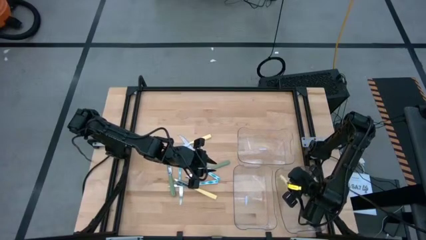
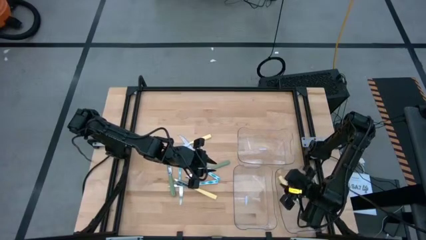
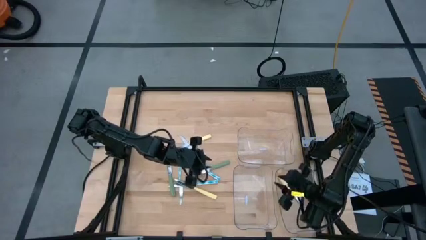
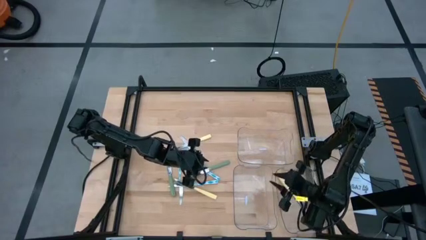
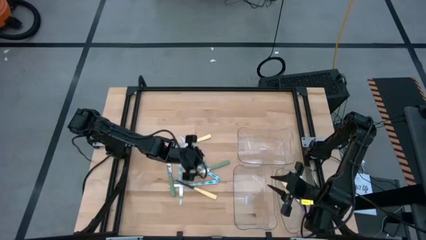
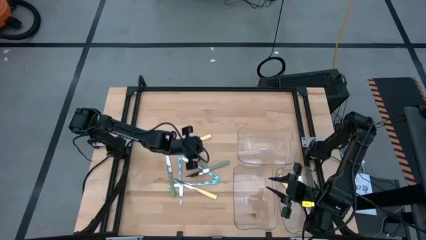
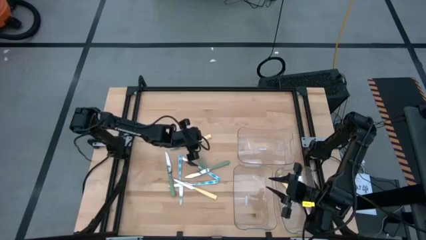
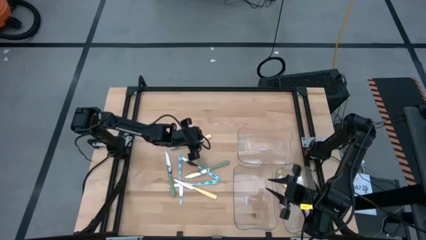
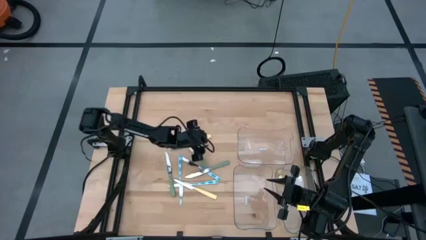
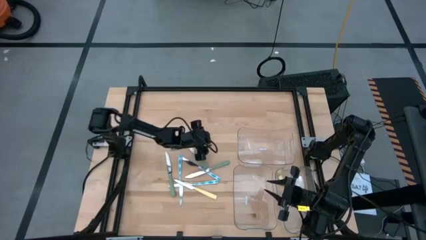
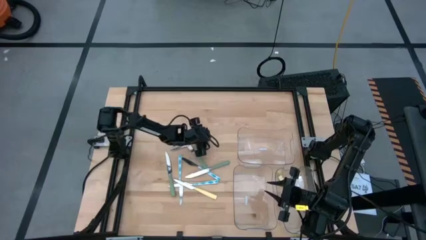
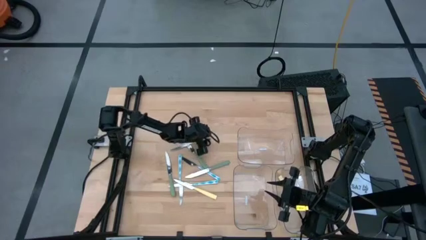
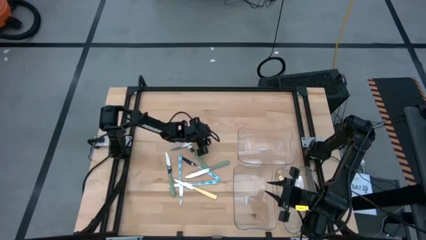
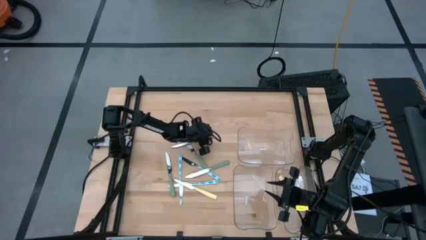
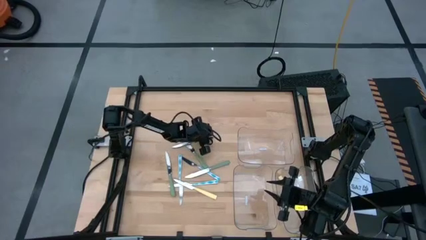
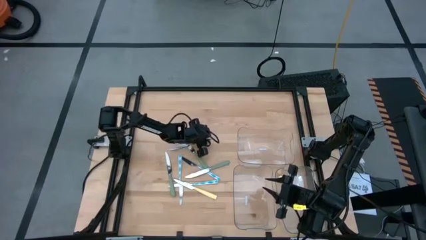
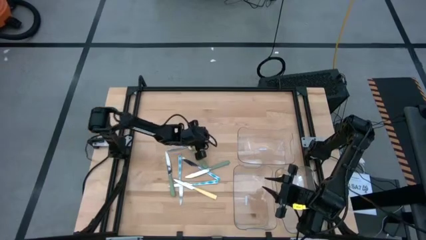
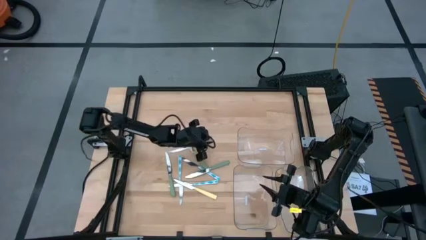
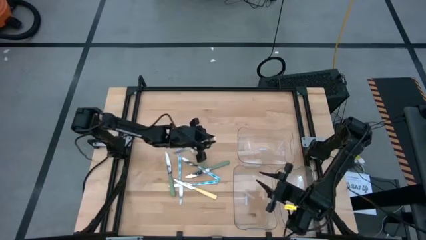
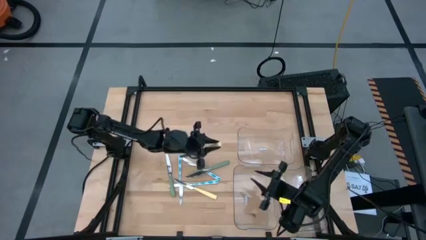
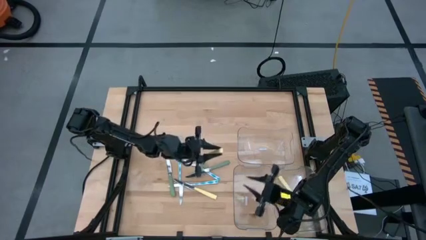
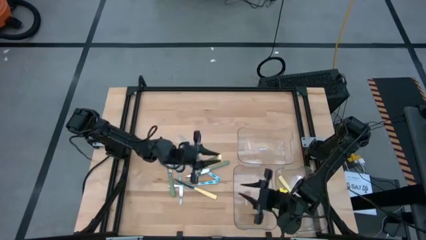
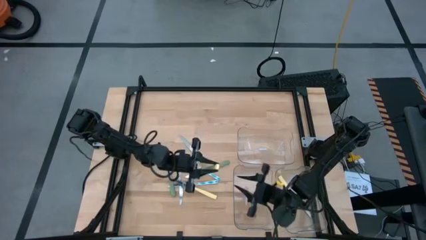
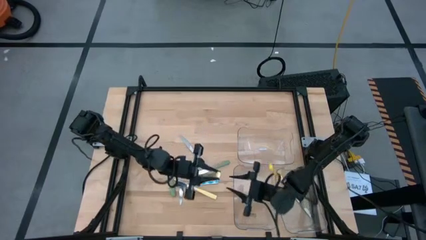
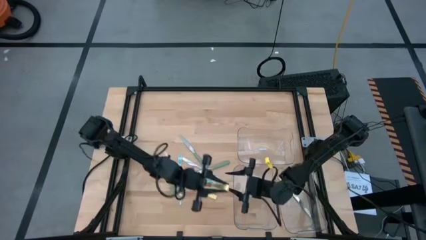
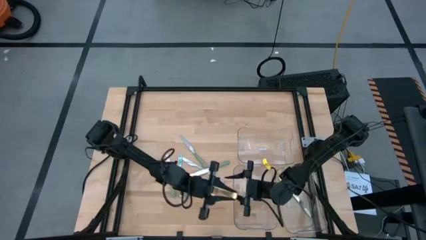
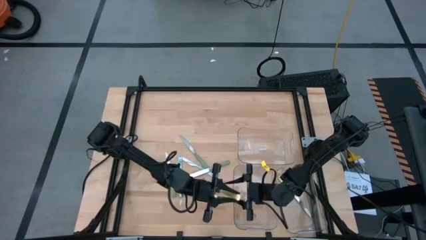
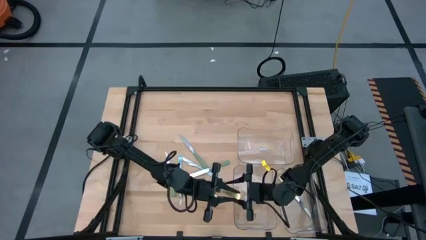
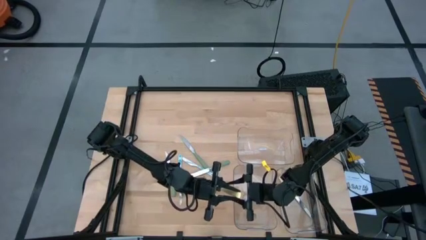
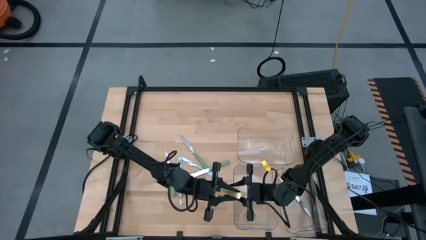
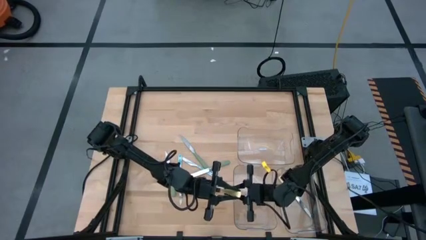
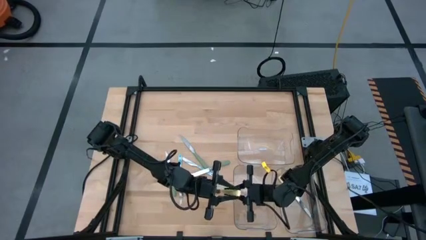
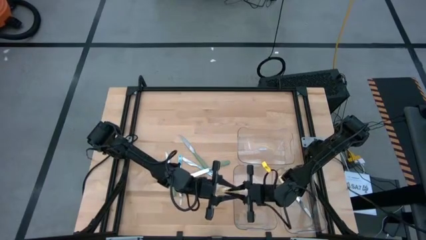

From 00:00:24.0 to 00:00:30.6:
Task: Sort silverware by color (type)
Put the yellow knife into the bottom right transparent bin

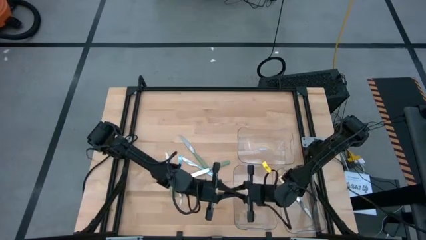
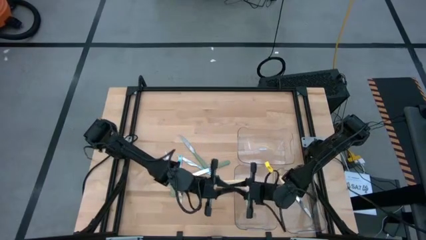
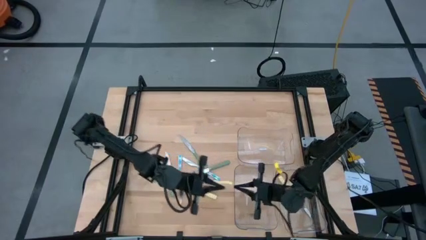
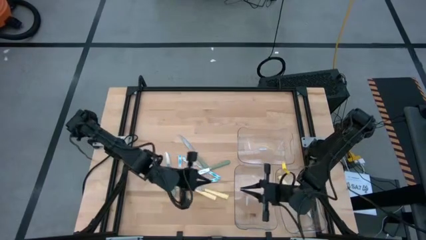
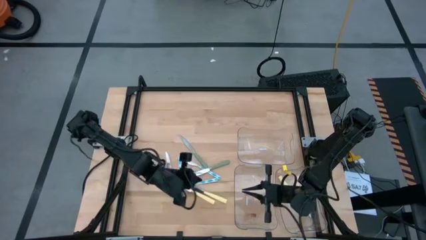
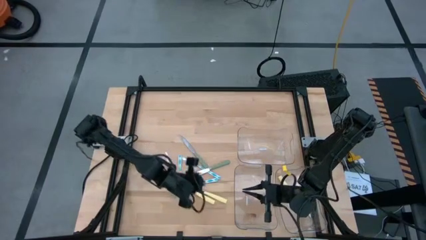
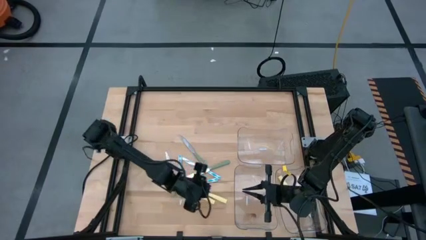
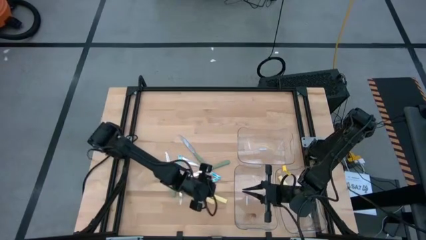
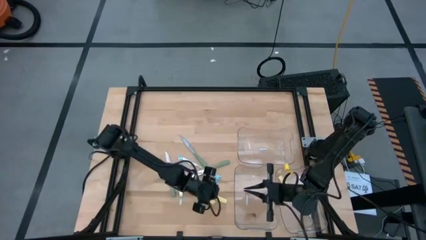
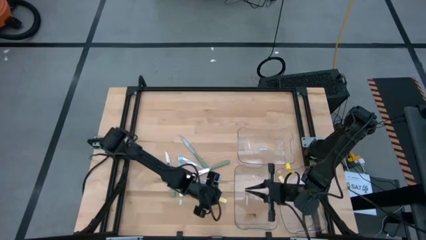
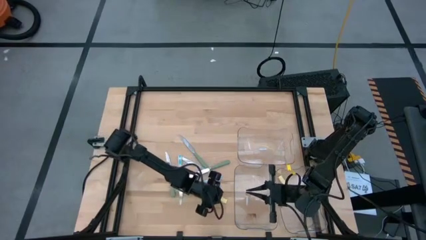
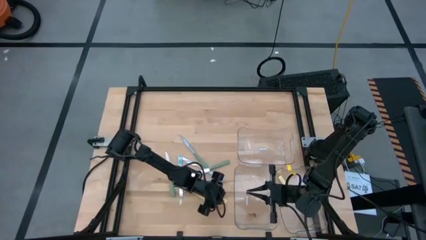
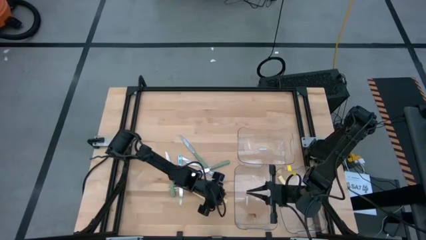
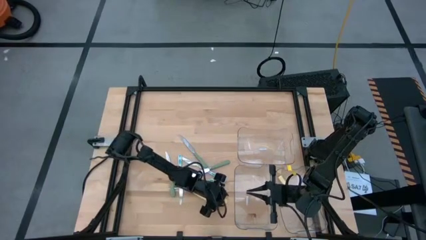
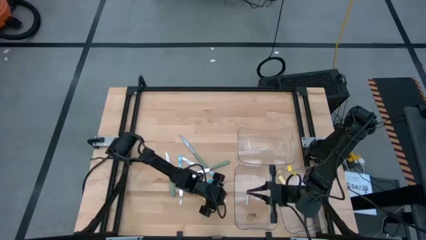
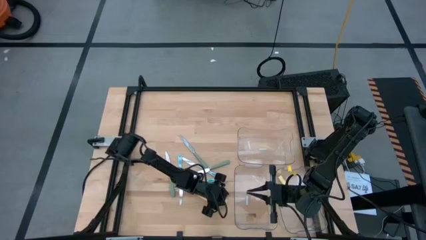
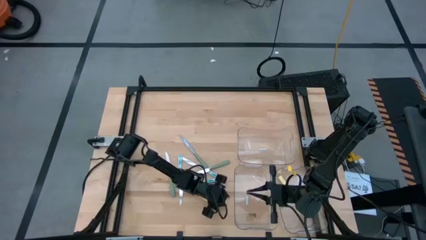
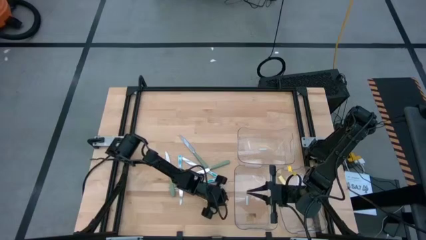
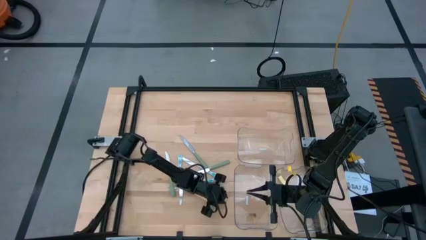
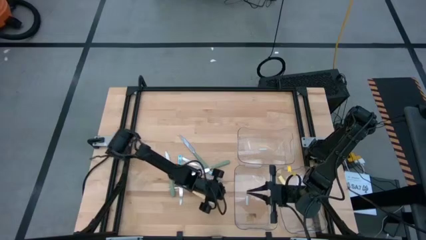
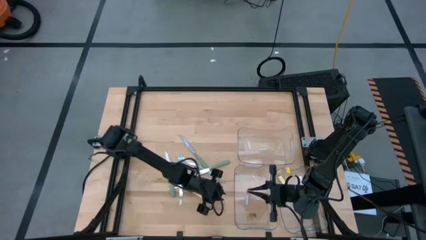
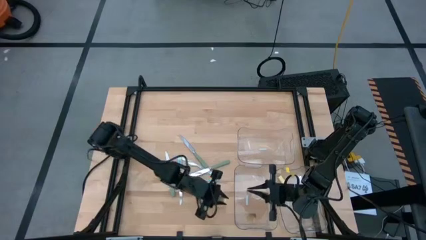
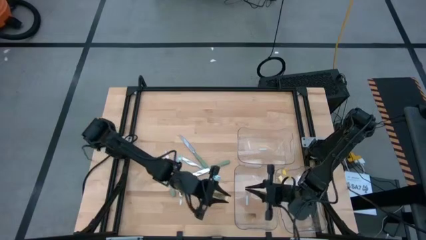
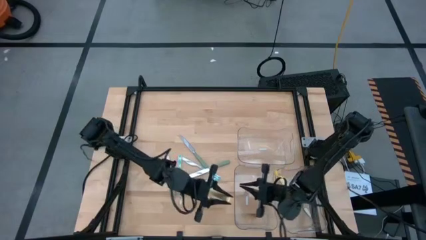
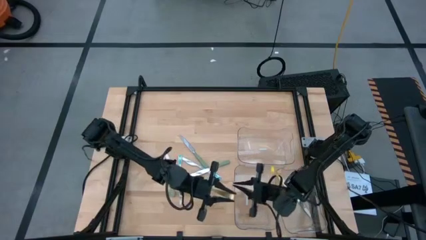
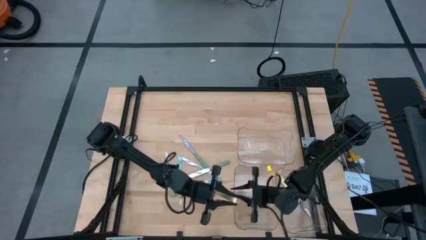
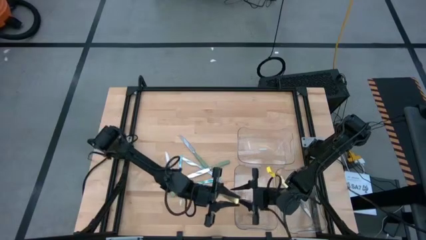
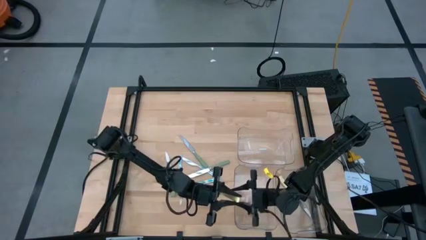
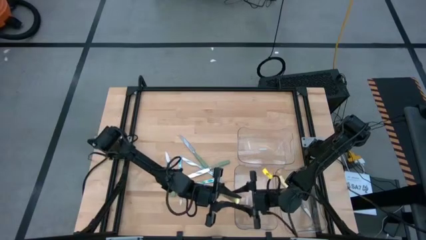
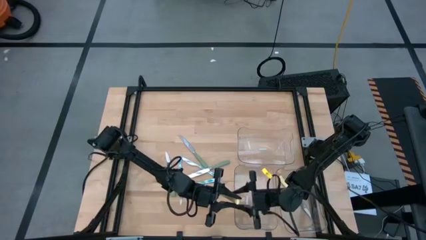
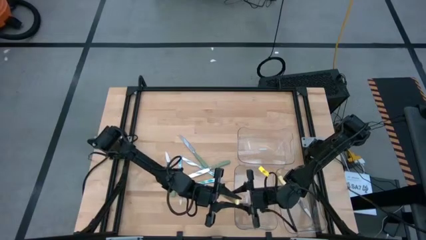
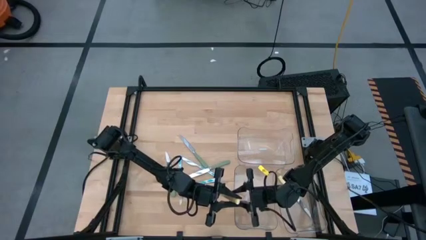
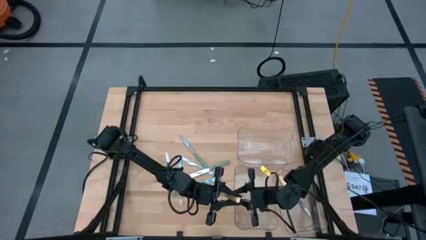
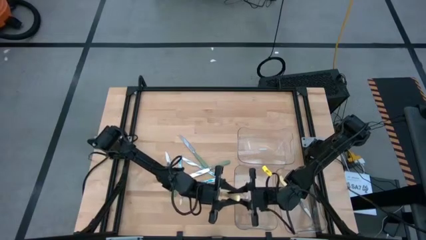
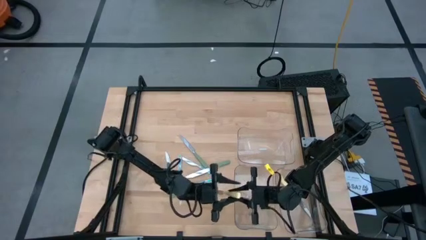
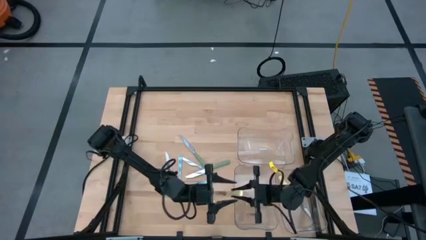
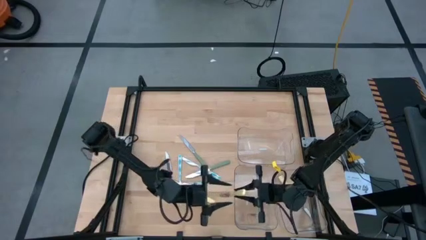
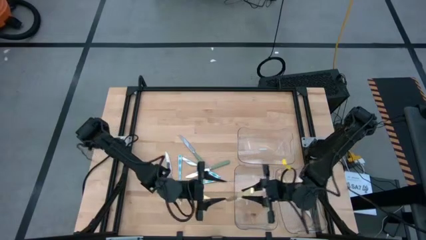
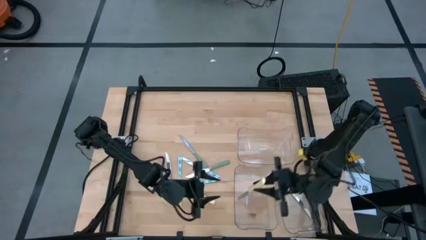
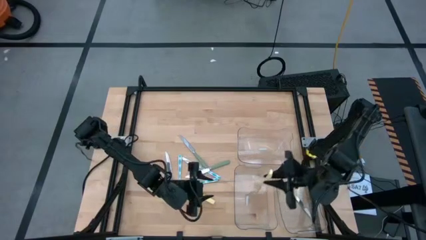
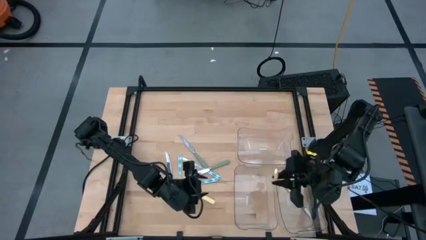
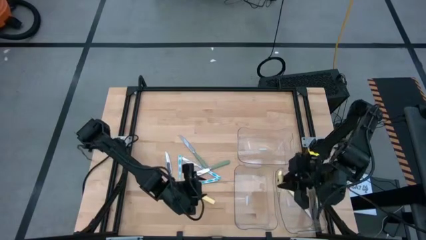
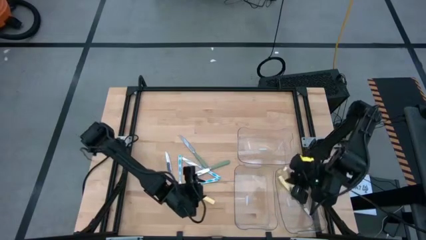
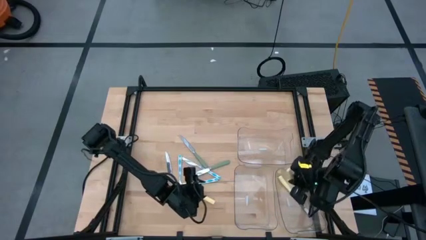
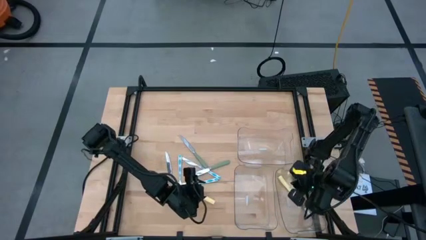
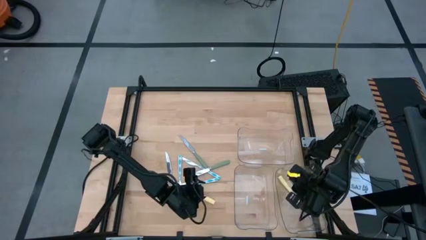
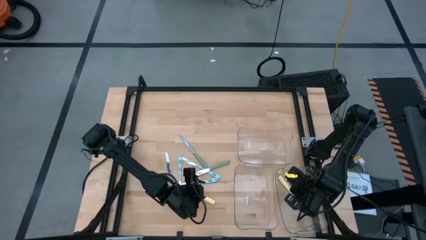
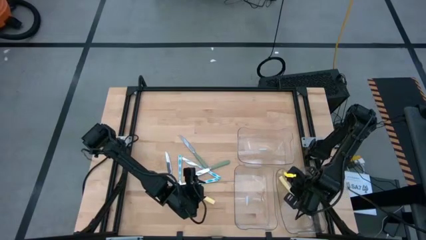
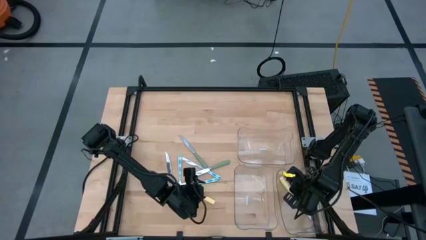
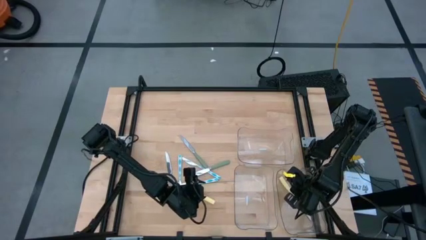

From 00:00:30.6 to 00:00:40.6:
Put the yellow knife into the bottom right transparent bin

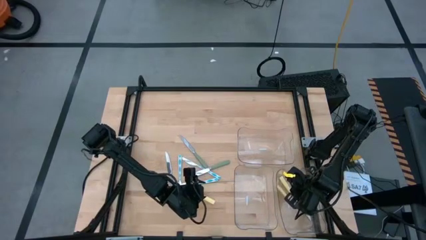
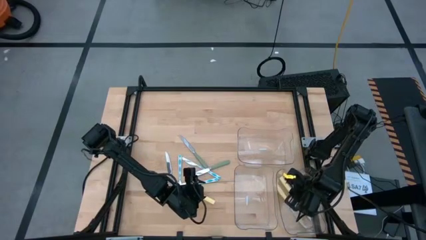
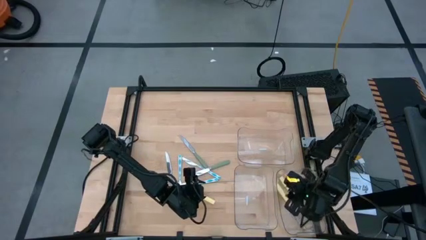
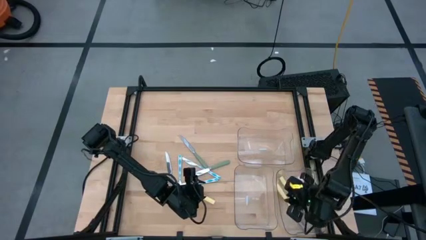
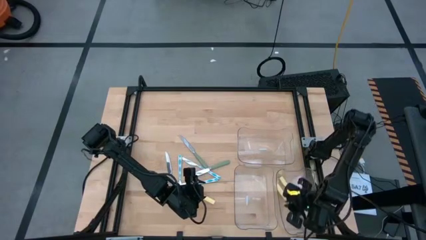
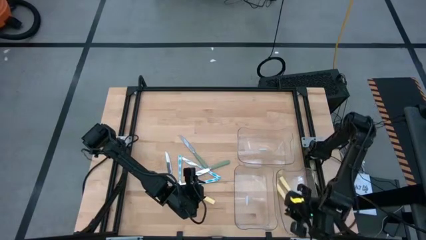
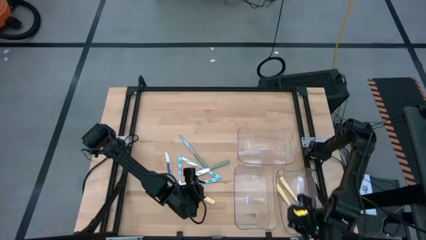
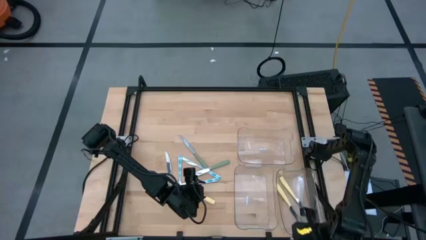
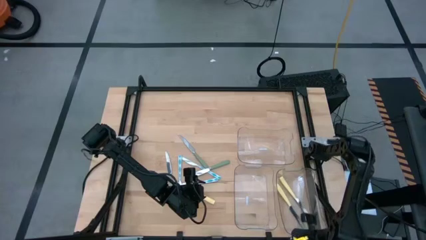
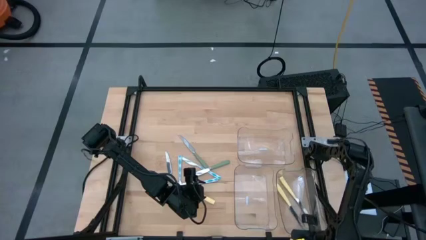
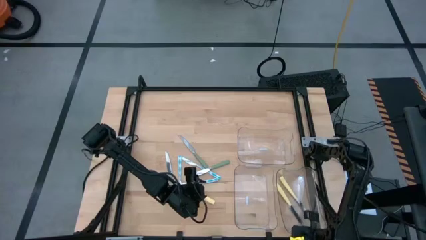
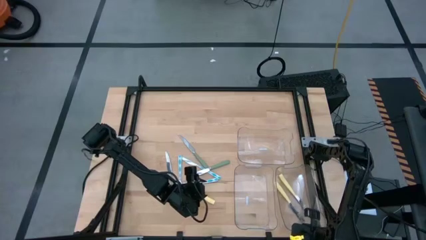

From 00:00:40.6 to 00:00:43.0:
Adjust the bottom right transparent bin
